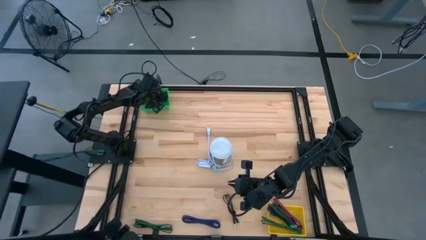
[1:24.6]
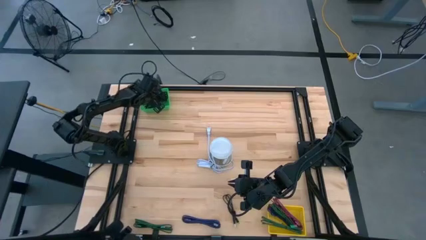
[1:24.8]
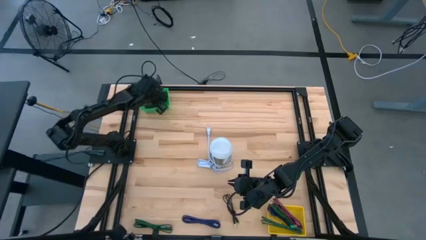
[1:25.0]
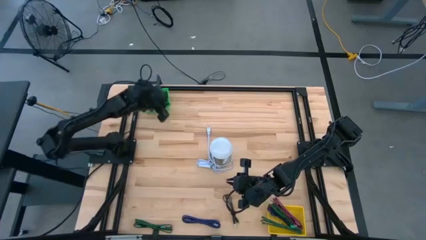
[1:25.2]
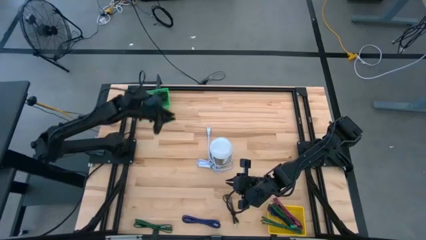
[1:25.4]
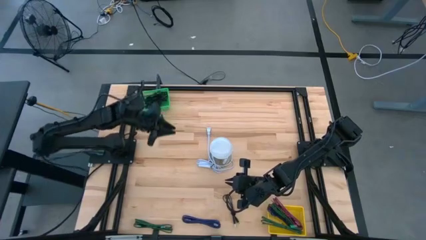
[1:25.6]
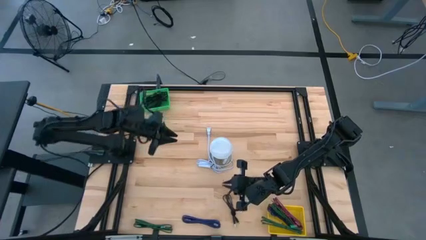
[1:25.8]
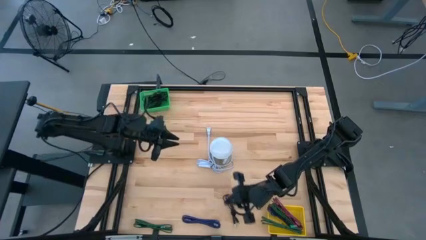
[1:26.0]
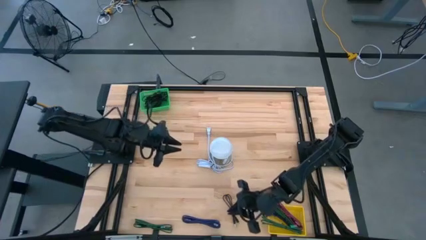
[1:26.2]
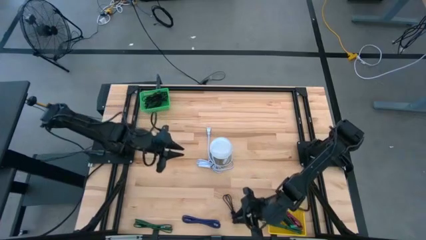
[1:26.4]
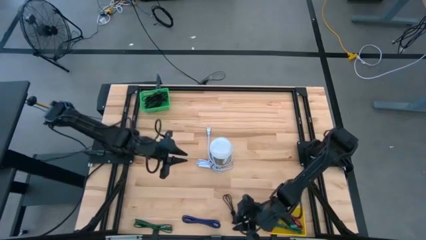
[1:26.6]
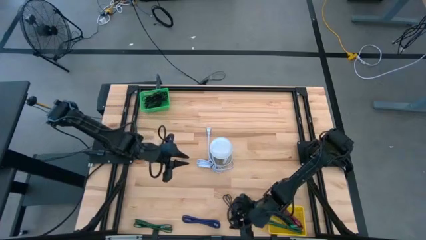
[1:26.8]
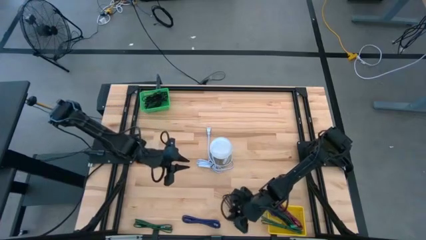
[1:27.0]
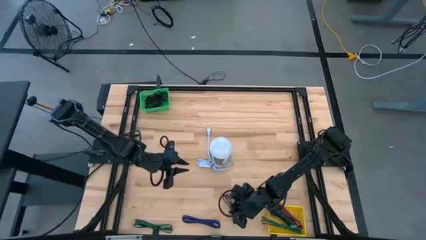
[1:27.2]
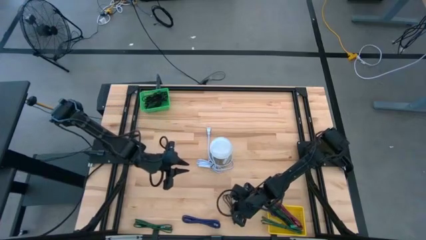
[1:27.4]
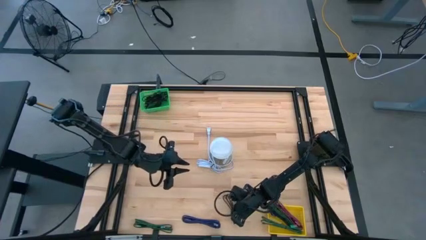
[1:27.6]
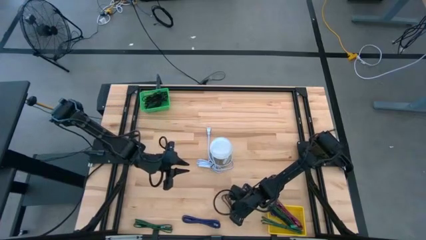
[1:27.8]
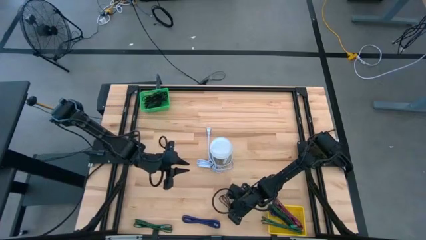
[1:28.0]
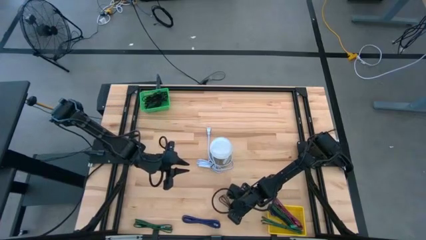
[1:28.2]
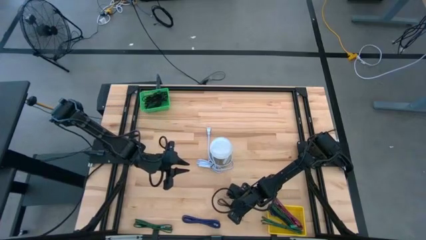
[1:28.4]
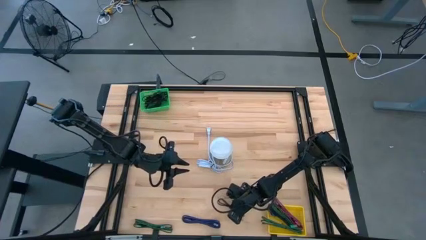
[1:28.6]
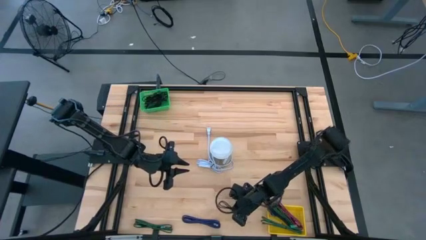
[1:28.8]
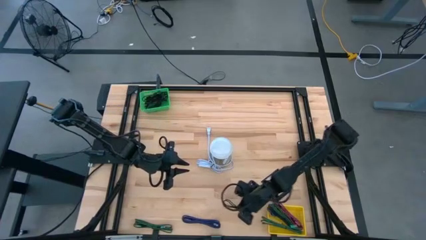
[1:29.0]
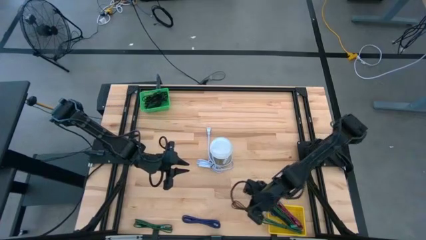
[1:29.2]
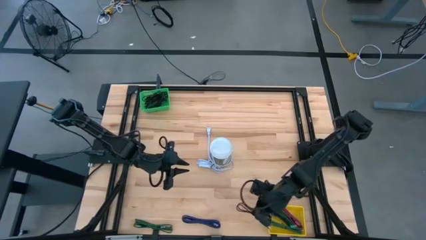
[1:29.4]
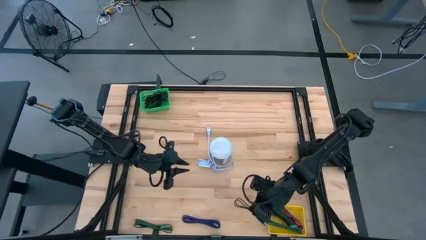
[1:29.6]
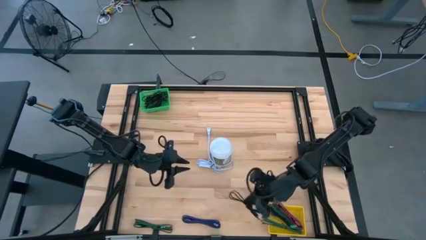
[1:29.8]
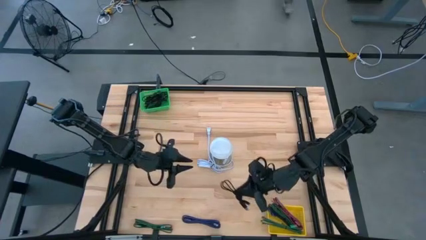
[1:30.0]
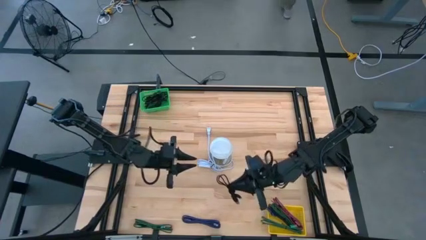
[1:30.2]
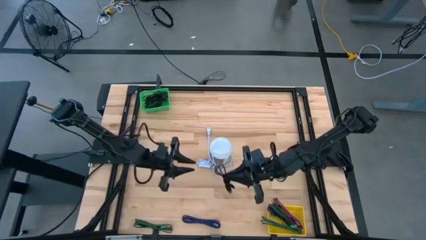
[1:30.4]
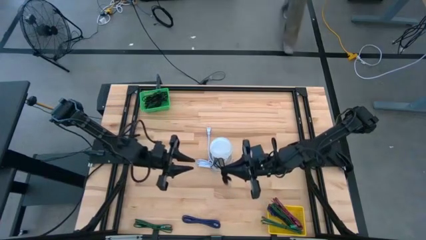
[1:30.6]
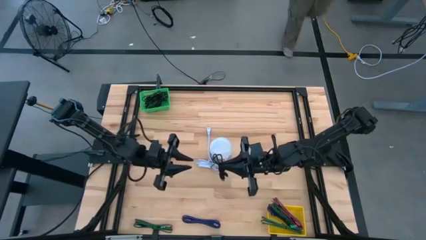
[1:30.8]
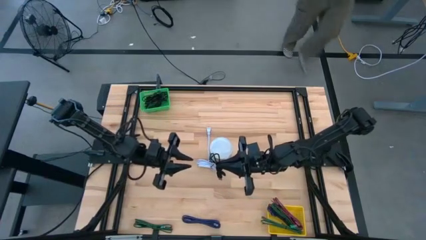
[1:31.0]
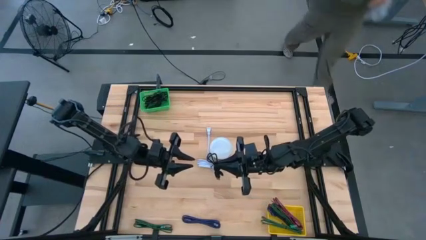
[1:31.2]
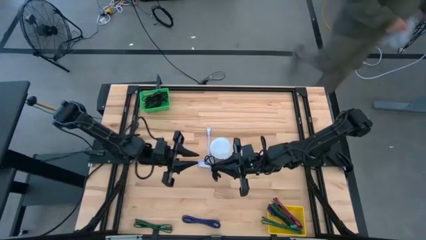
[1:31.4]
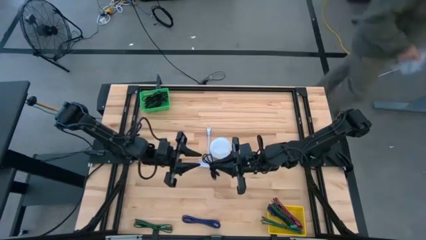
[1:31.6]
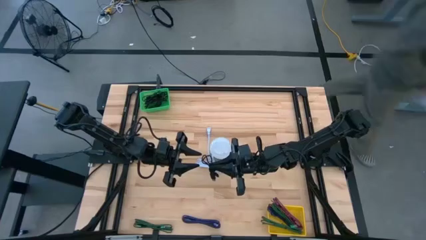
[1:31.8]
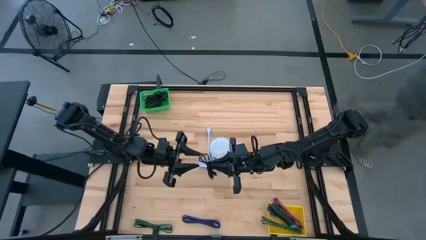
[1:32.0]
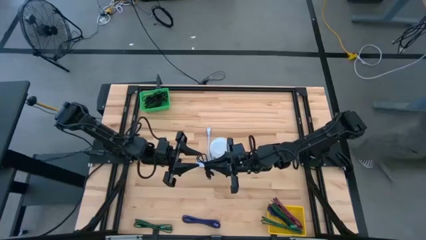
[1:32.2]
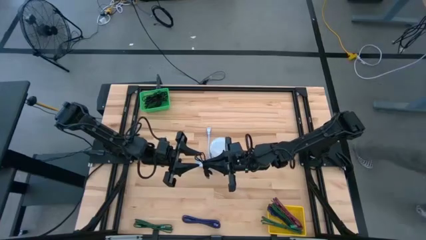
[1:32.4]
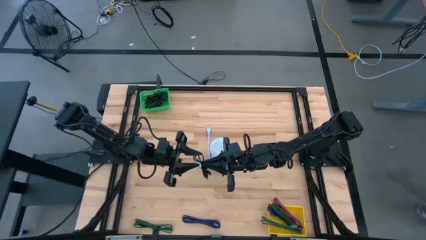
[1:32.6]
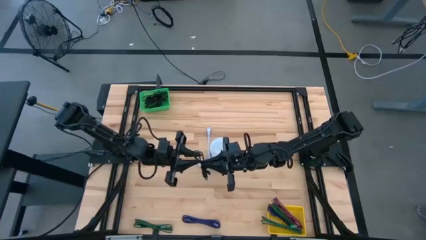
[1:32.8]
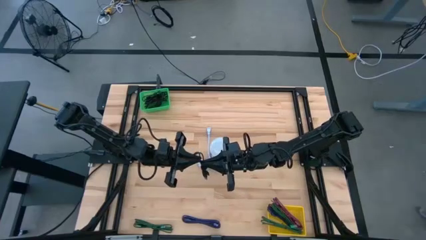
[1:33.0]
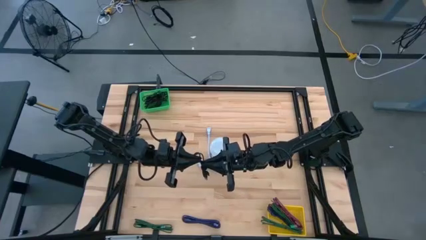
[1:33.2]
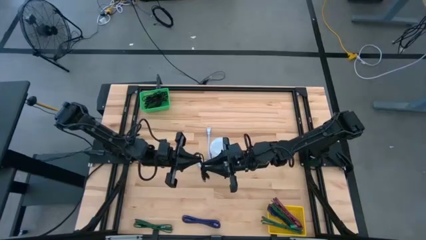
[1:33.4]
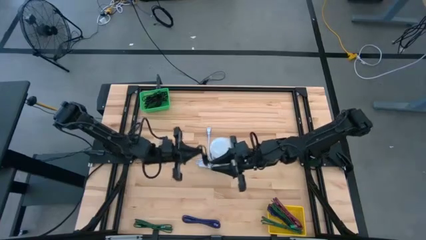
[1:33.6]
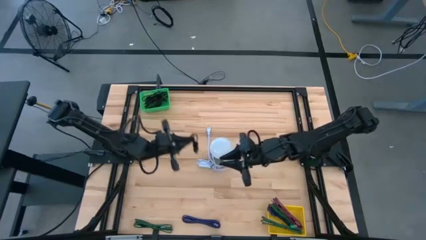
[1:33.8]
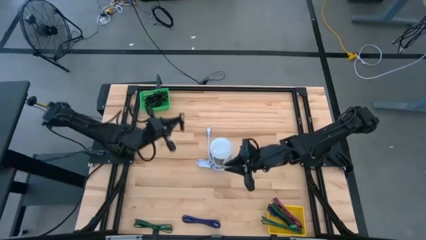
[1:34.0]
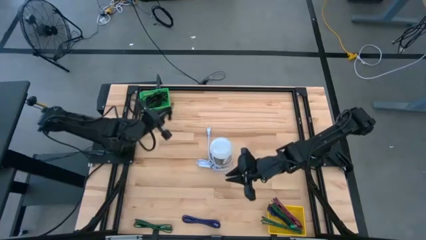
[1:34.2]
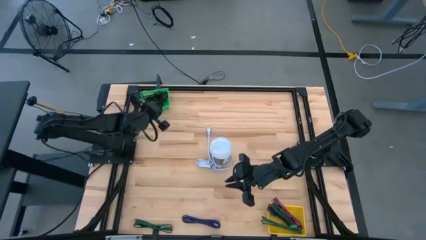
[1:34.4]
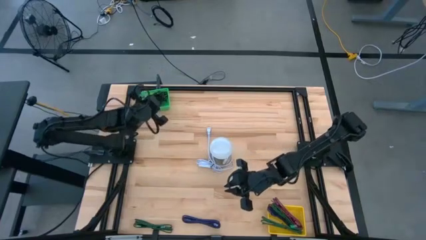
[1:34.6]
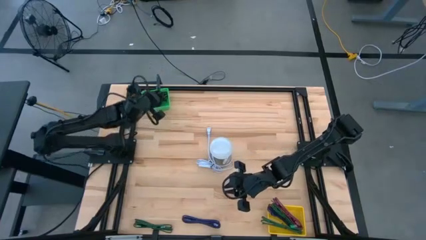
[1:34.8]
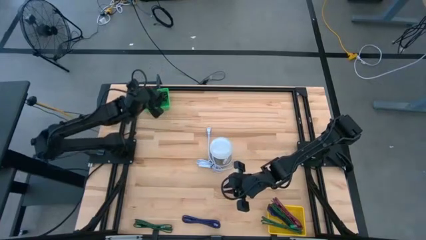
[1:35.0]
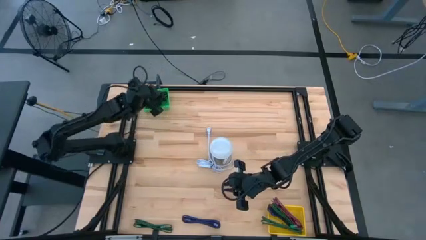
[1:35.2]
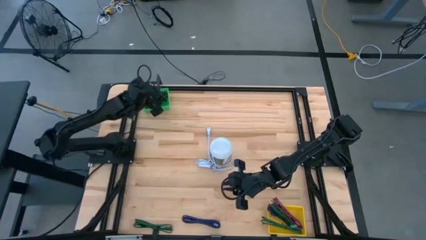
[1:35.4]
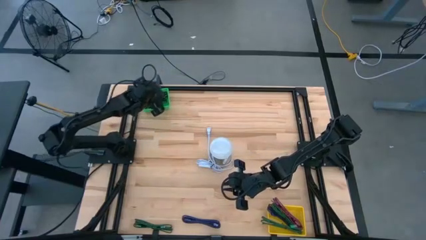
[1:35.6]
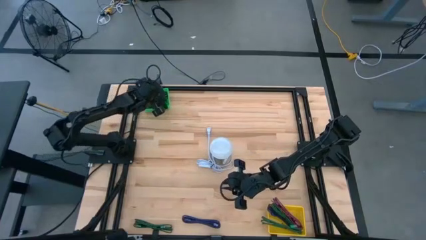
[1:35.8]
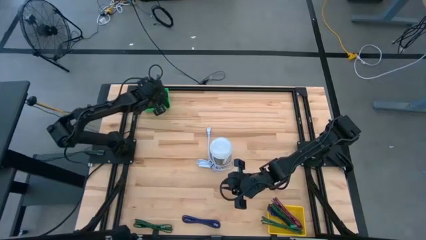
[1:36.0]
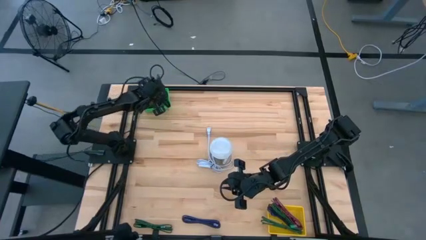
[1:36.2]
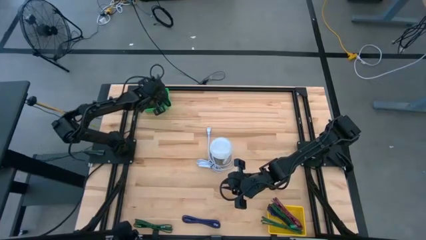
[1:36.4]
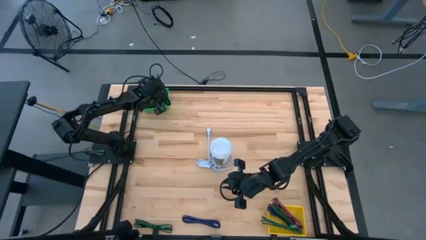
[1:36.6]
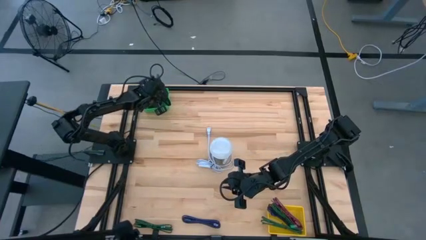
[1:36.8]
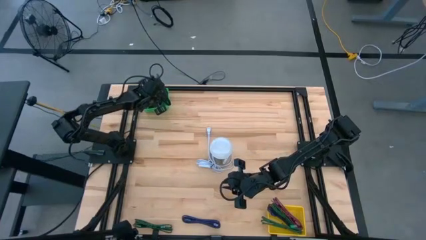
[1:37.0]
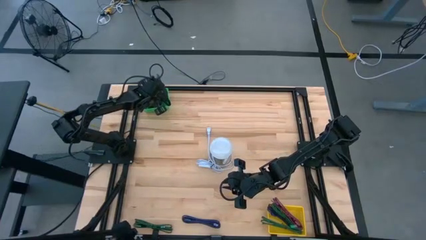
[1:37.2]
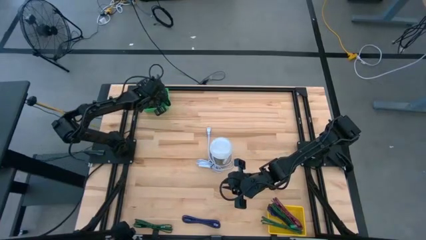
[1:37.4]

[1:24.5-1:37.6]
Task: Pick & Place USB Port
Put the plain black charger cable into the green basket

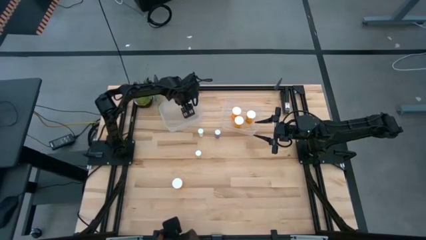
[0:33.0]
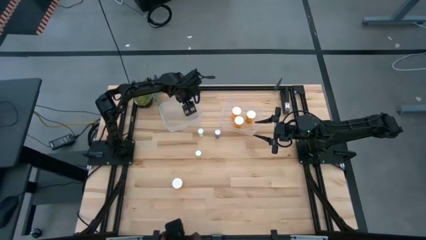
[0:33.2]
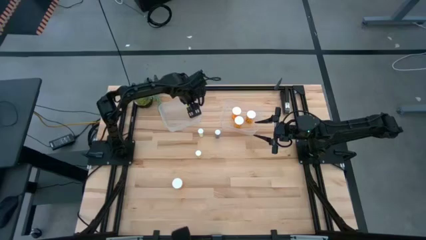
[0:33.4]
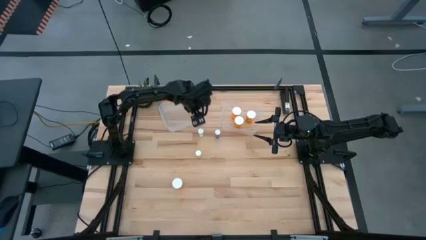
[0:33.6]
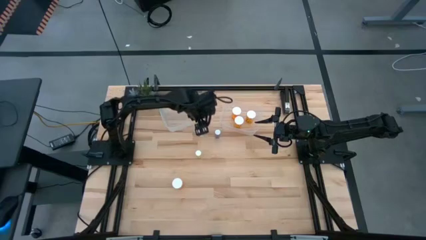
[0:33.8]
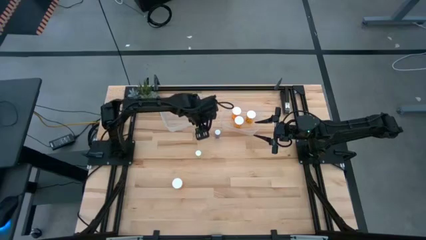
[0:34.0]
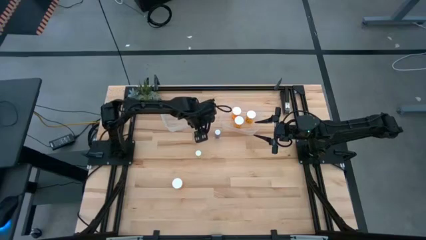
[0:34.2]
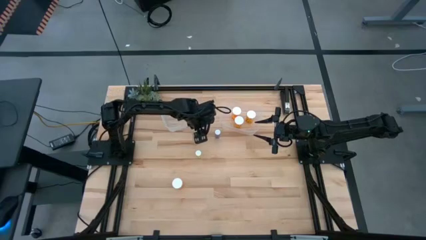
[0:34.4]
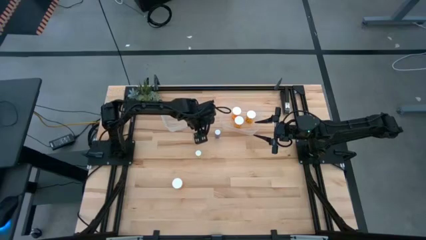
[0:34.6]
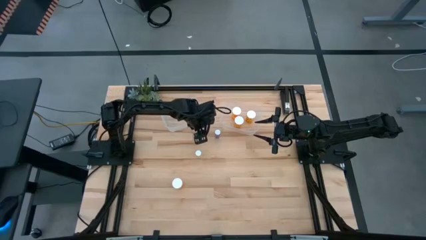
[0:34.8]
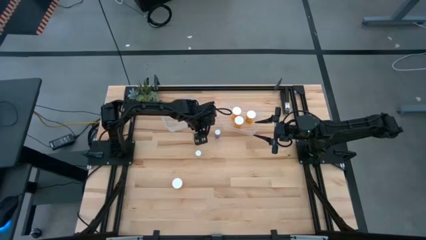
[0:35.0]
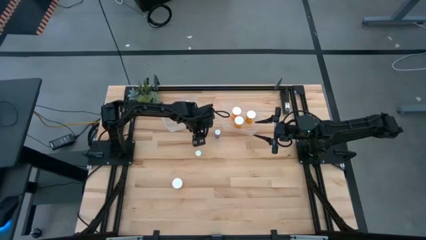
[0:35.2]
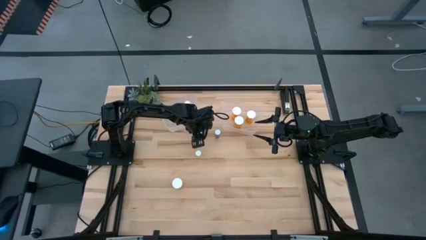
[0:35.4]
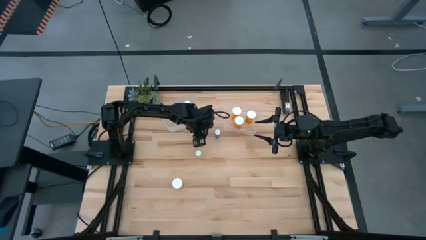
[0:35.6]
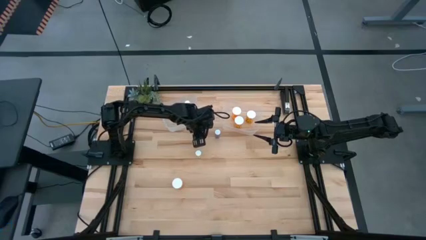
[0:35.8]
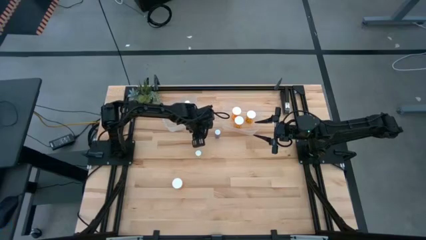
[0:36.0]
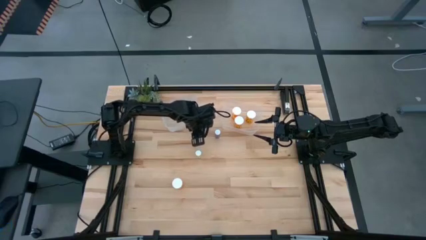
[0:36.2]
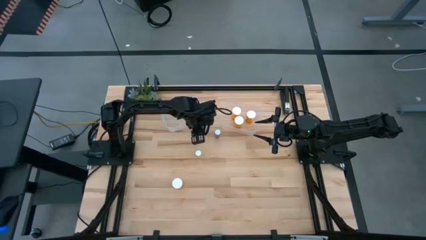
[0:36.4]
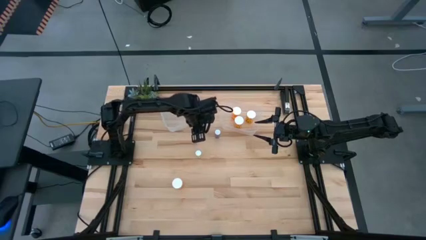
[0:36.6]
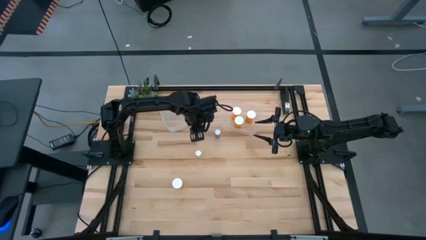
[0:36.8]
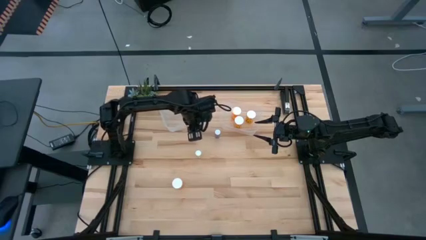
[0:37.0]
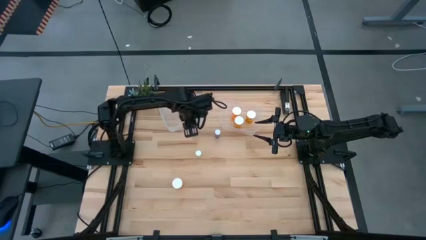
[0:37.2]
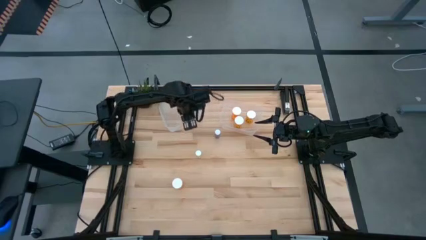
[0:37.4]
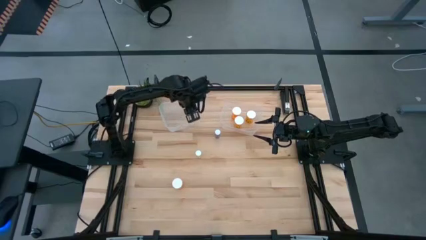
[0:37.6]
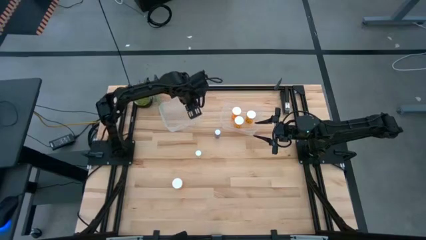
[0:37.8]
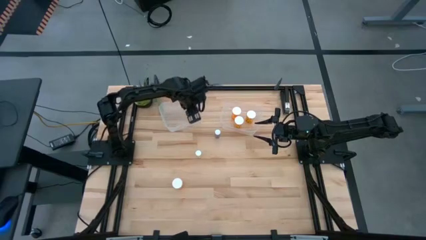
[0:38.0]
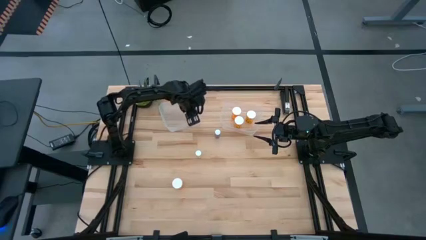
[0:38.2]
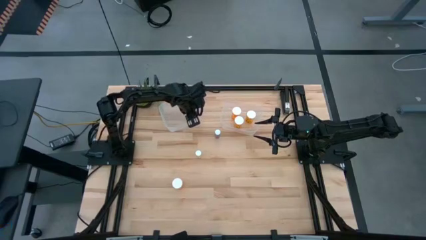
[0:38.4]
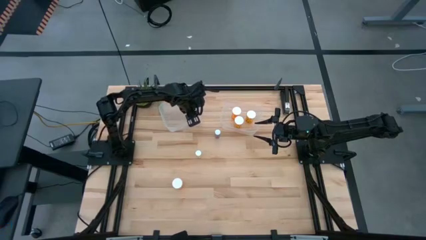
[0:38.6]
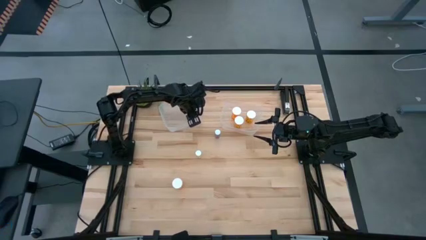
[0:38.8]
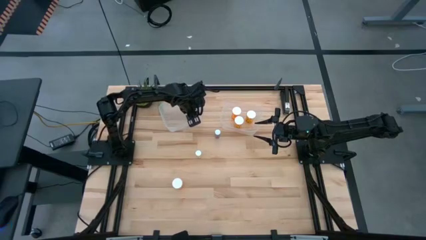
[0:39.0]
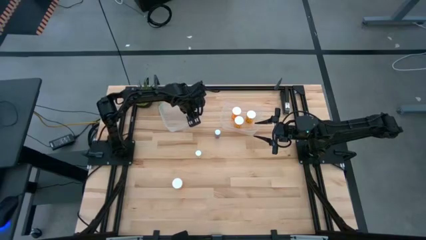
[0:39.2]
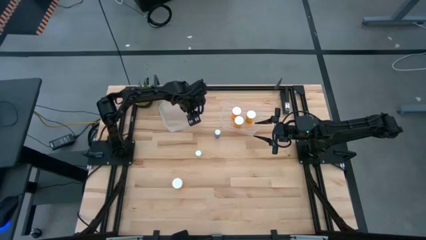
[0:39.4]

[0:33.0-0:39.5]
Task: Pick and place medicine bottles into bin by pill shape (circle, oval)
Put the yellow pill bottle into the left bin
